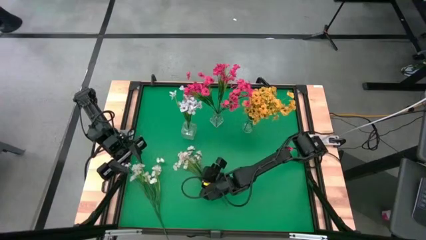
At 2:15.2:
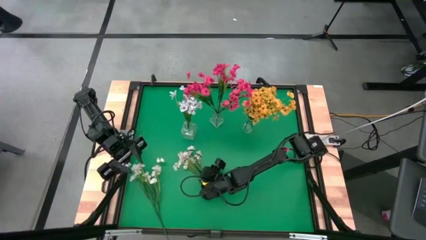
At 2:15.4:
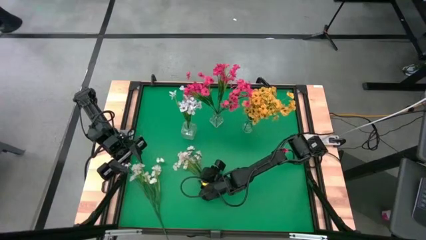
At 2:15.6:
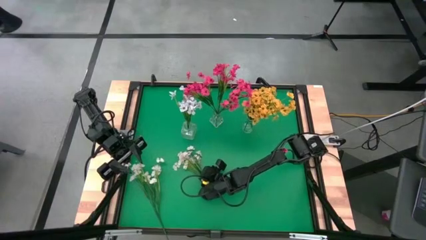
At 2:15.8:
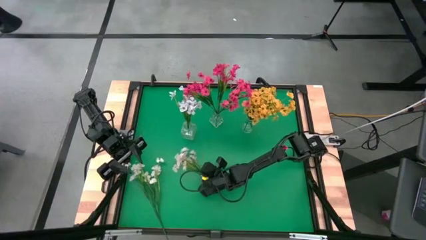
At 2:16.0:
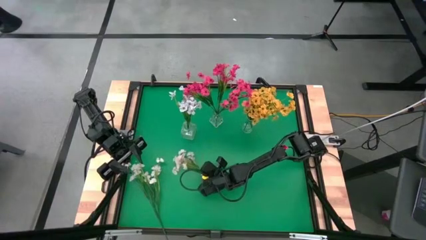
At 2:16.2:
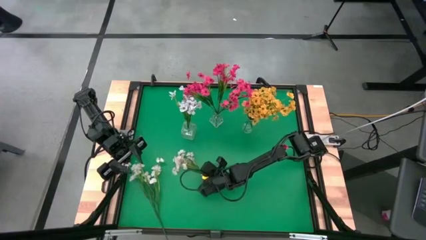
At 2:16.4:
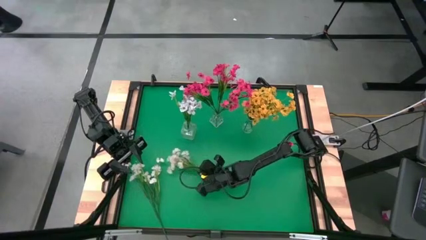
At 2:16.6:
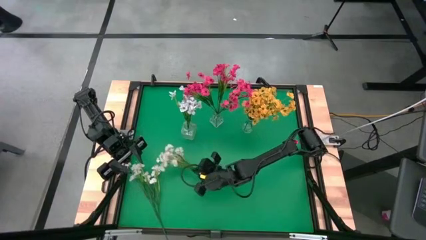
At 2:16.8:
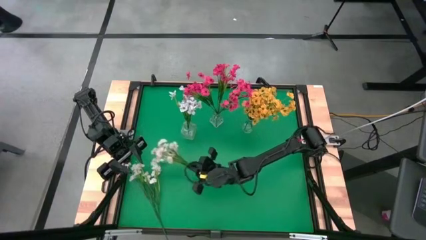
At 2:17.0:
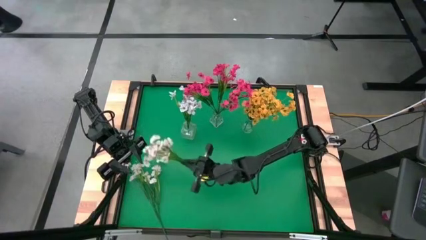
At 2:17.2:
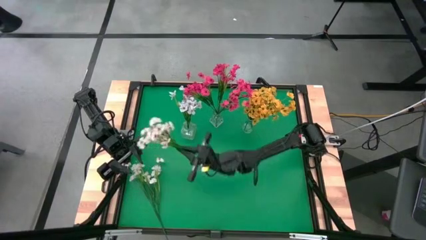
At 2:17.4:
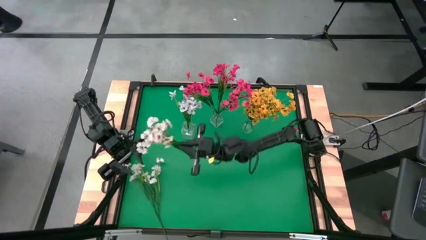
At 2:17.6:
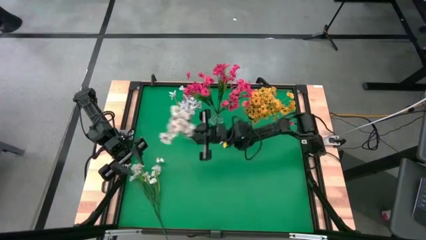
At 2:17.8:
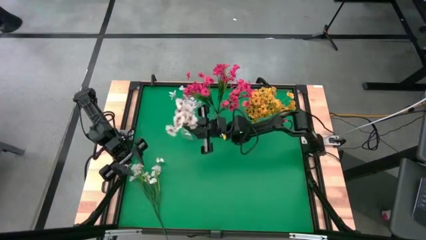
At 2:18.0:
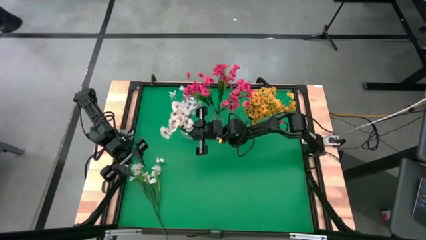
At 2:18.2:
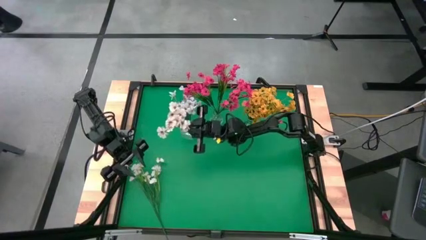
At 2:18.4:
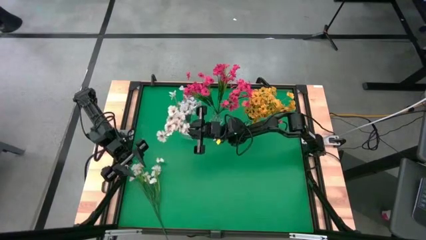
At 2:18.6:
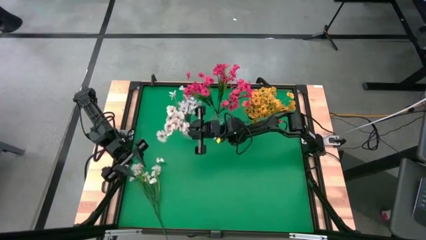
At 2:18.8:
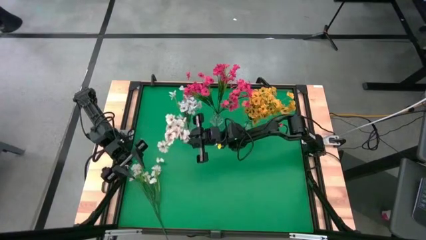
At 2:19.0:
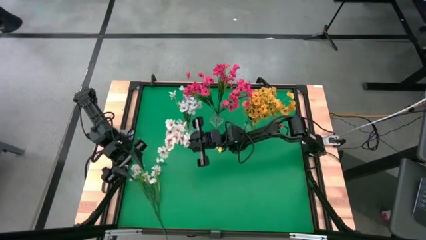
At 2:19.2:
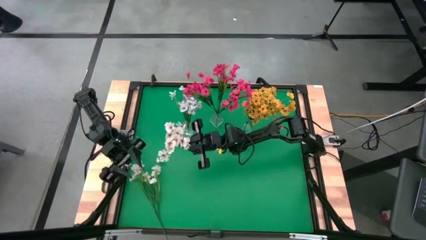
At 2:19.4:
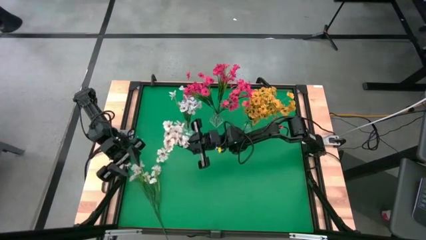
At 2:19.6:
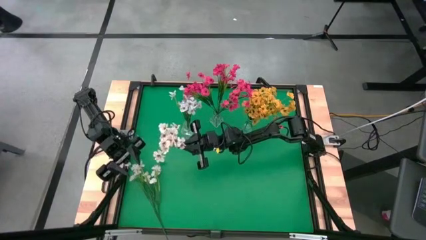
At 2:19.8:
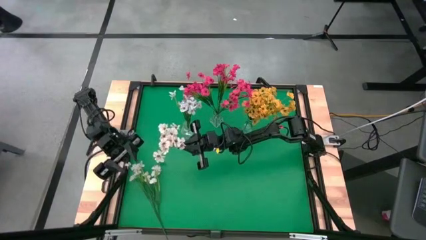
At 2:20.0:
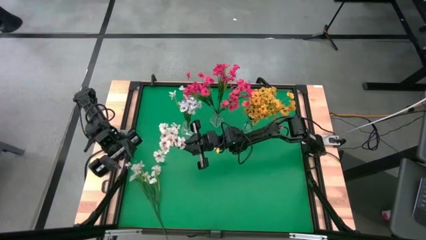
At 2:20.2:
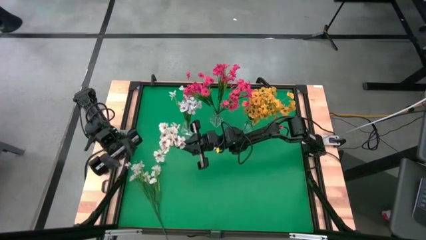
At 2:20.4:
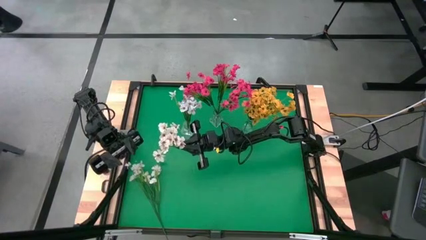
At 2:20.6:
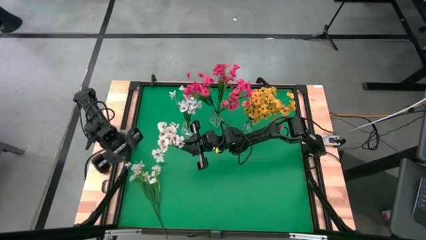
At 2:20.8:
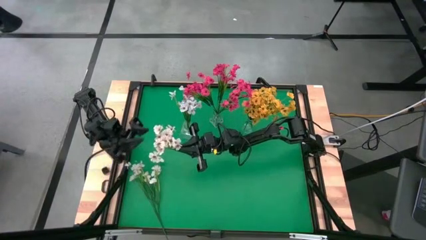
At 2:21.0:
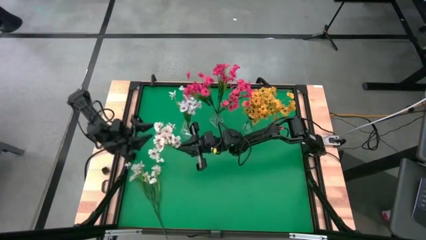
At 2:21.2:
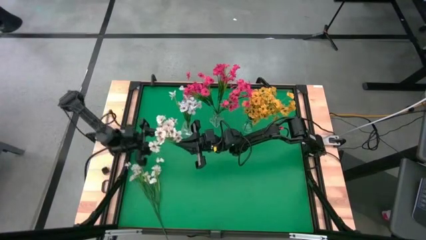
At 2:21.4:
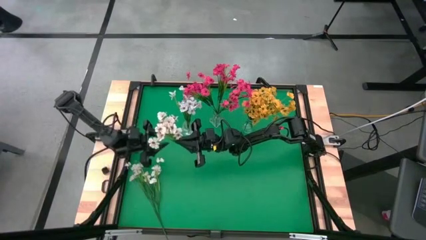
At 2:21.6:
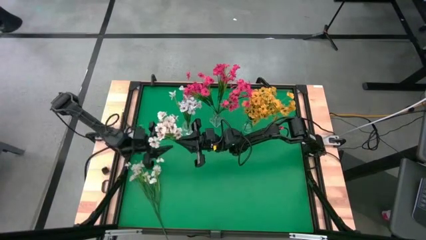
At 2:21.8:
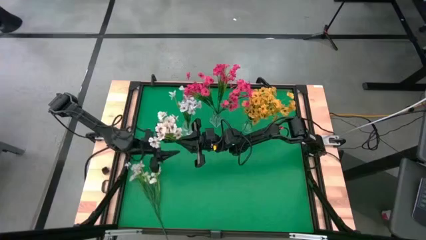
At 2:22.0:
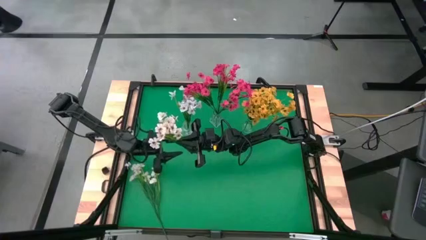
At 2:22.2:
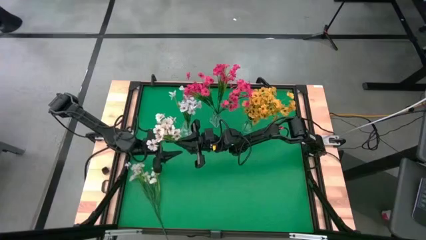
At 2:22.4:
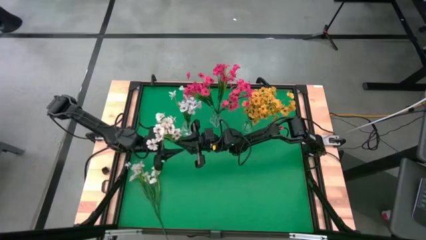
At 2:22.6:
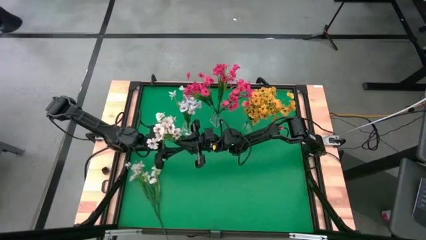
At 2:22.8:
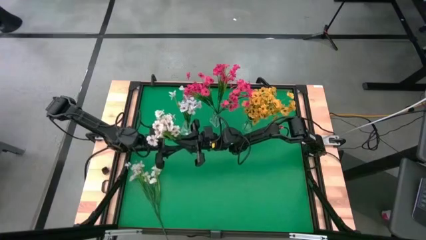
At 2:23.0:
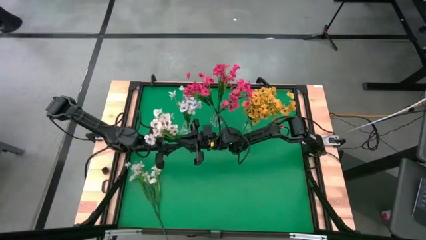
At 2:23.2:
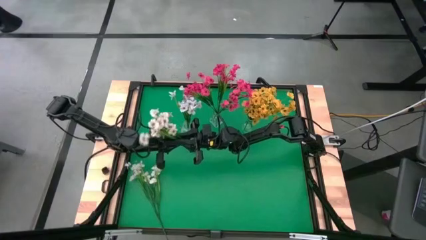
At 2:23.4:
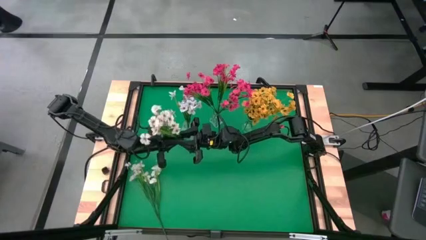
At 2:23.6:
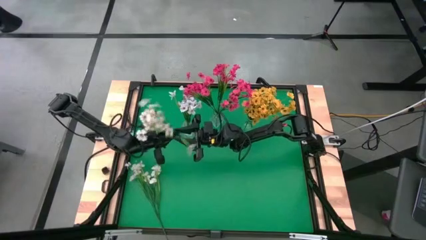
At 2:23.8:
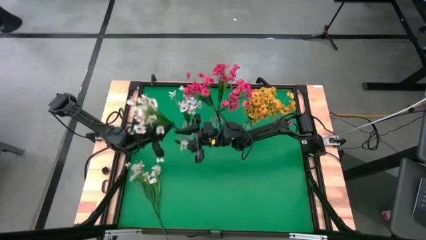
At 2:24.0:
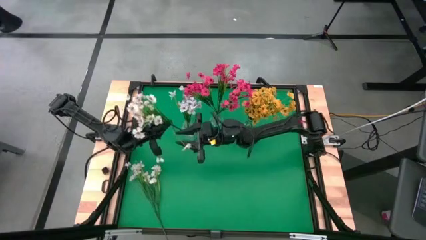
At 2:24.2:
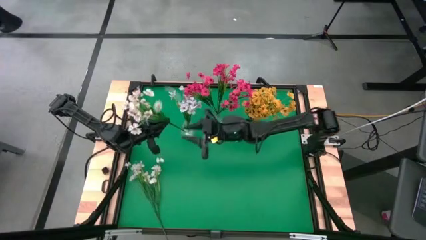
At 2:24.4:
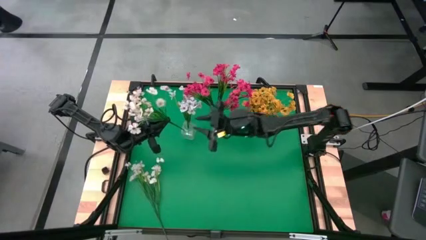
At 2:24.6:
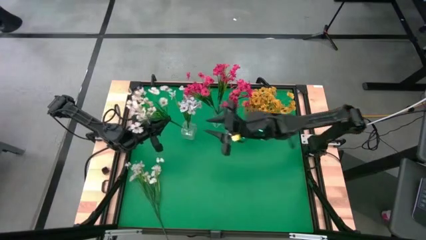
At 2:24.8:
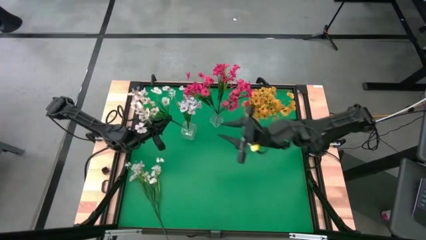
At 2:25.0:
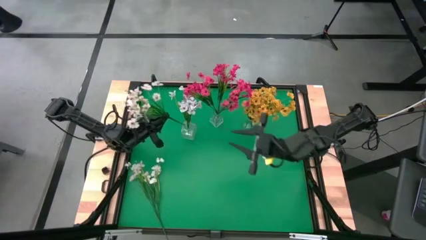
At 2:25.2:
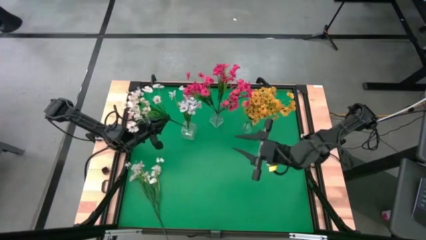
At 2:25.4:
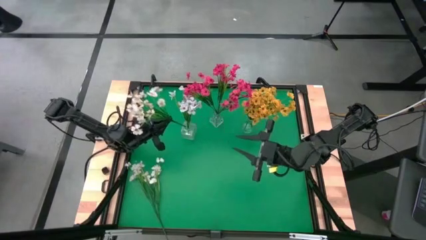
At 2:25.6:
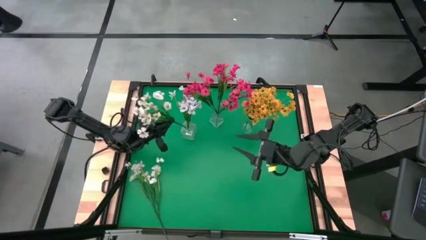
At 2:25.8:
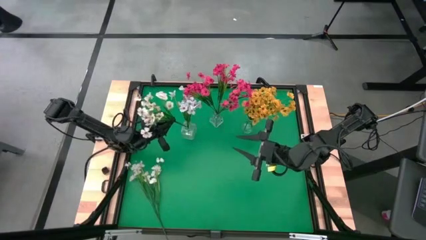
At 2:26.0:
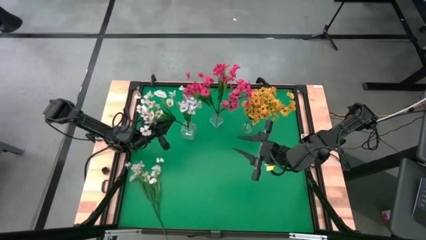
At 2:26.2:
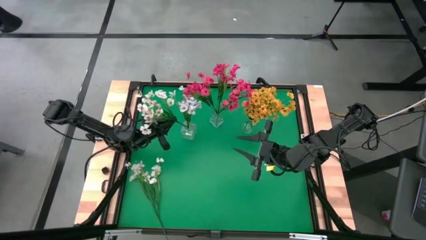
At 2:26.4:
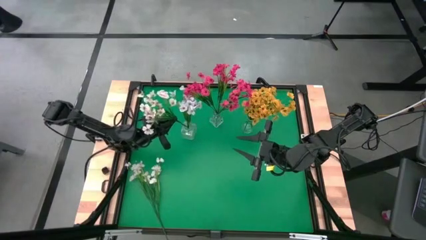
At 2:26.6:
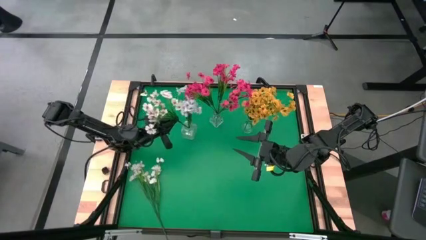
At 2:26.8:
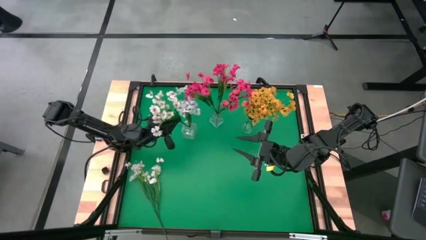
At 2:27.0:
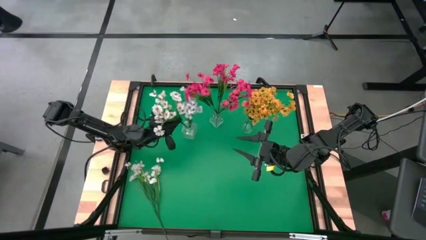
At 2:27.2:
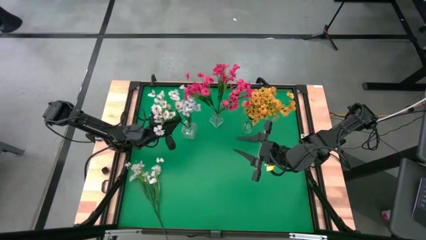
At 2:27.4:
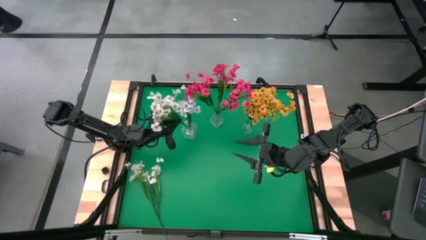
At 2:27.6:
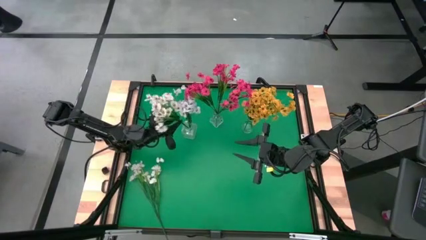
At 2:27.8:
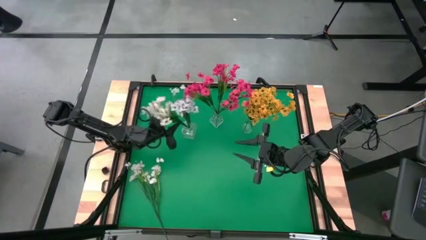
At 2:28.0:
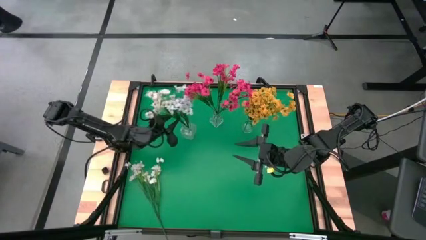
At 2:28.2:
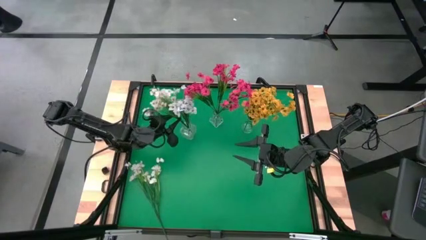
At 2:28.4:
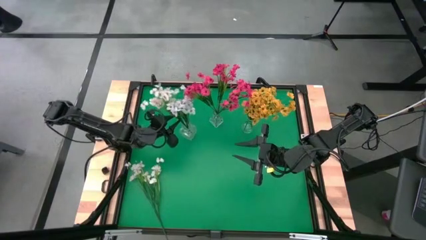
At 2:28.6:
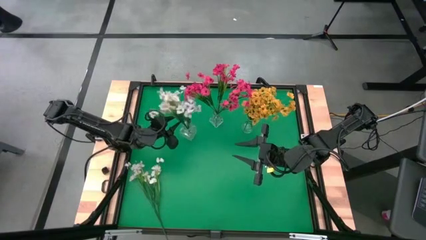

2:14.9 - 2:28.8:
Task: Sort flowers into vase by color
Put the right white flower into the left transparent vase
